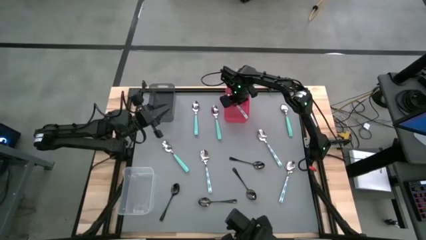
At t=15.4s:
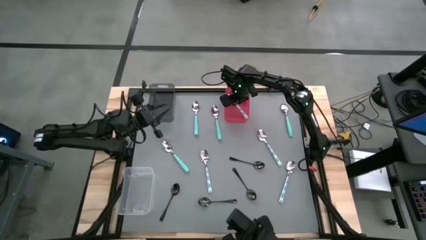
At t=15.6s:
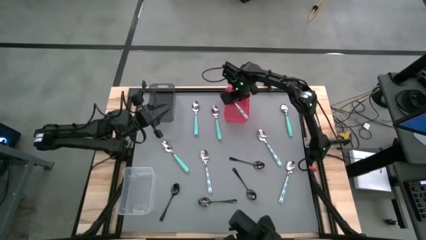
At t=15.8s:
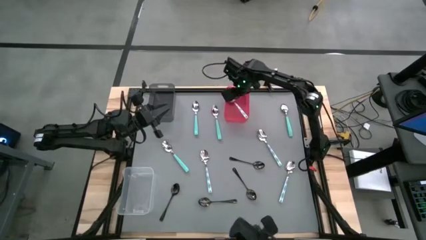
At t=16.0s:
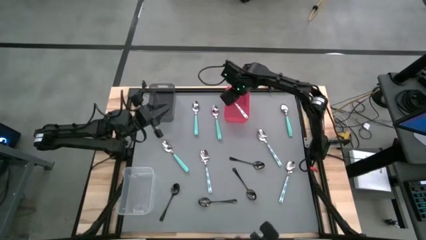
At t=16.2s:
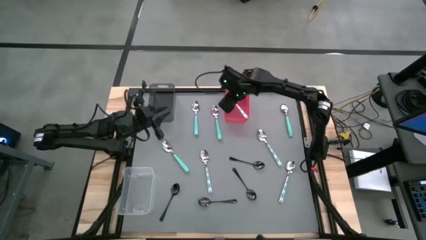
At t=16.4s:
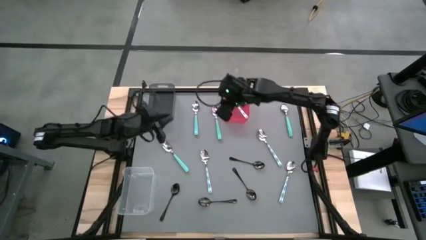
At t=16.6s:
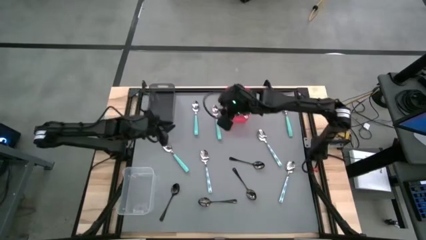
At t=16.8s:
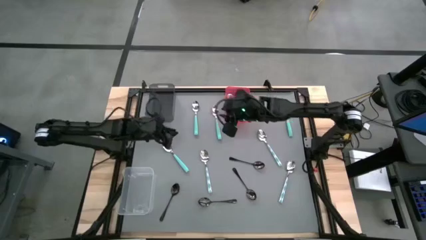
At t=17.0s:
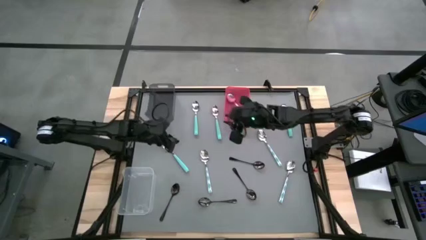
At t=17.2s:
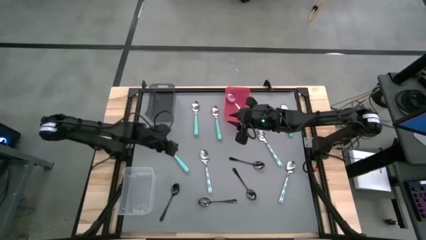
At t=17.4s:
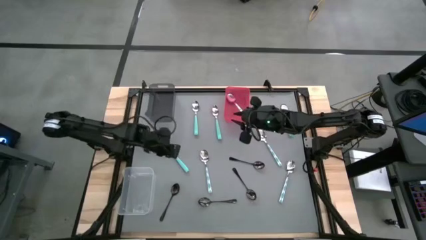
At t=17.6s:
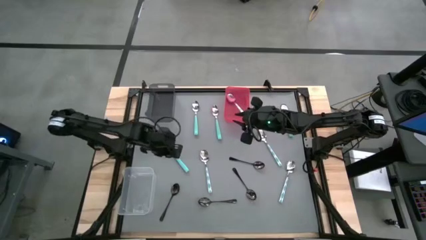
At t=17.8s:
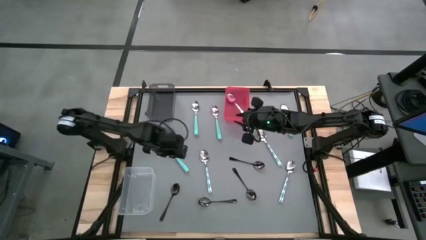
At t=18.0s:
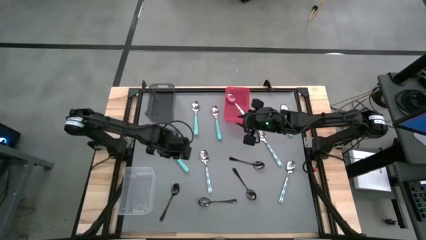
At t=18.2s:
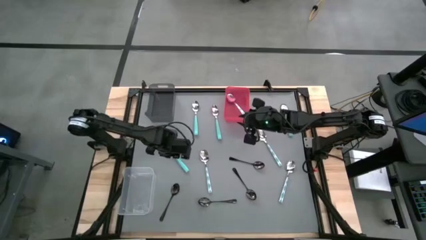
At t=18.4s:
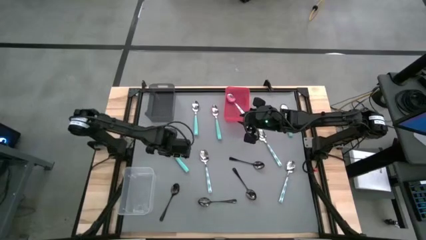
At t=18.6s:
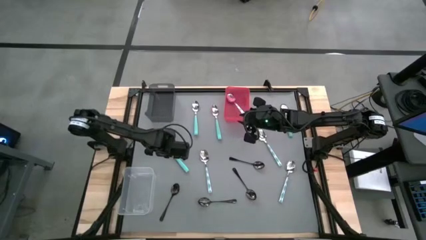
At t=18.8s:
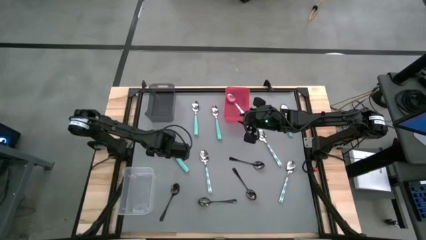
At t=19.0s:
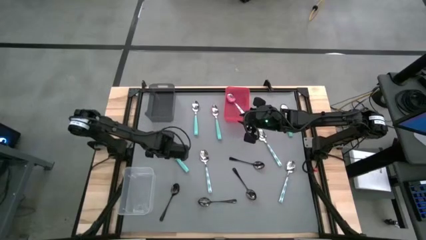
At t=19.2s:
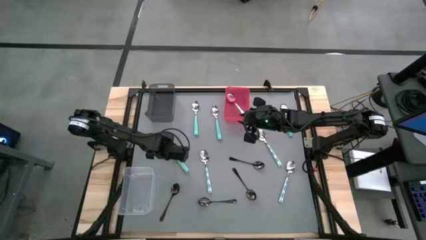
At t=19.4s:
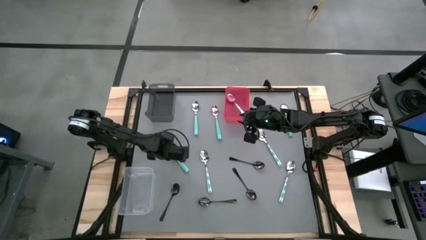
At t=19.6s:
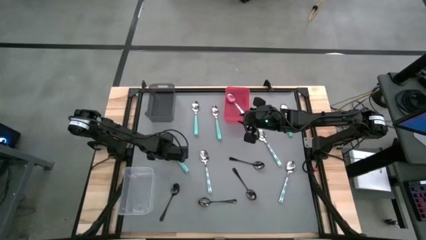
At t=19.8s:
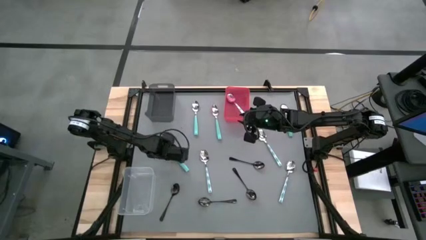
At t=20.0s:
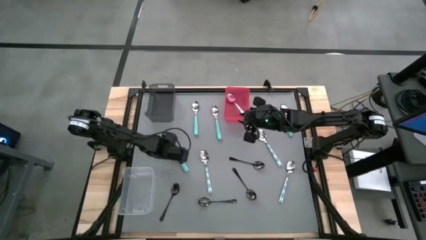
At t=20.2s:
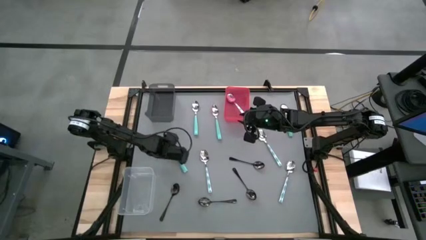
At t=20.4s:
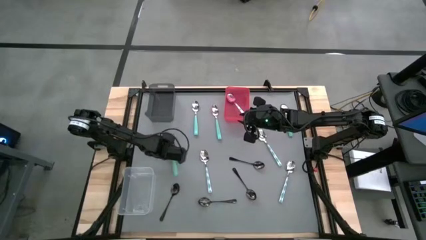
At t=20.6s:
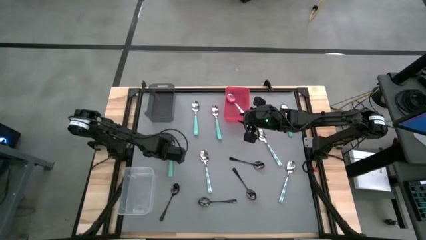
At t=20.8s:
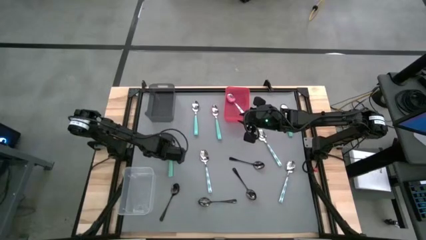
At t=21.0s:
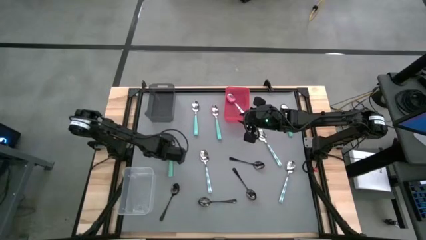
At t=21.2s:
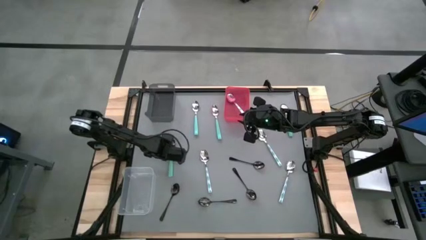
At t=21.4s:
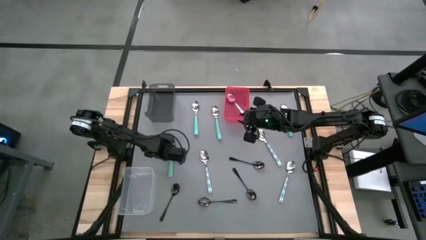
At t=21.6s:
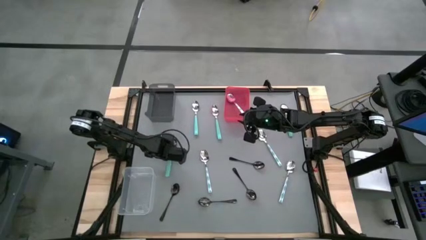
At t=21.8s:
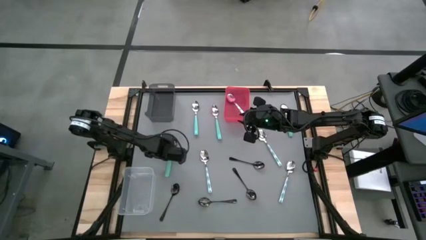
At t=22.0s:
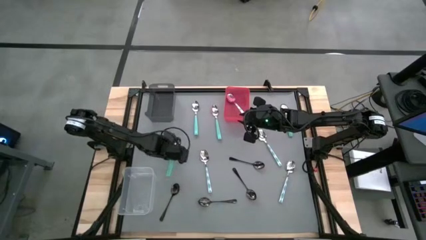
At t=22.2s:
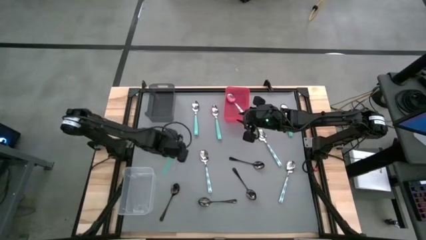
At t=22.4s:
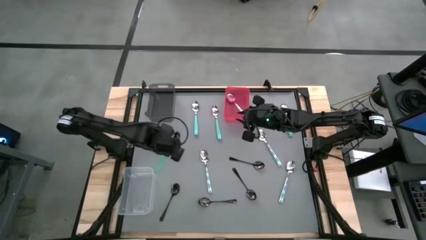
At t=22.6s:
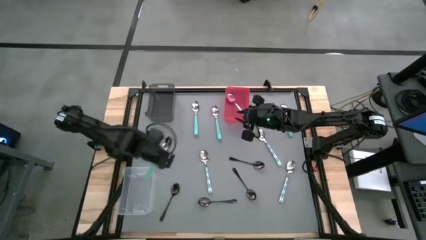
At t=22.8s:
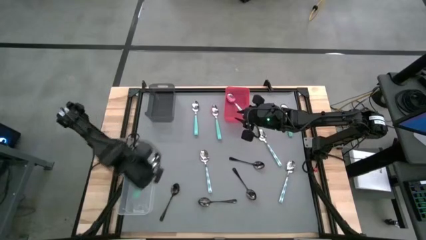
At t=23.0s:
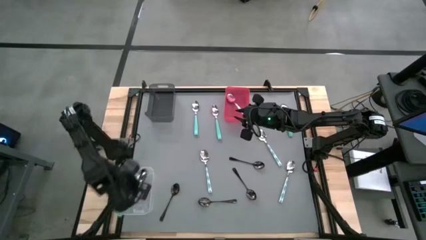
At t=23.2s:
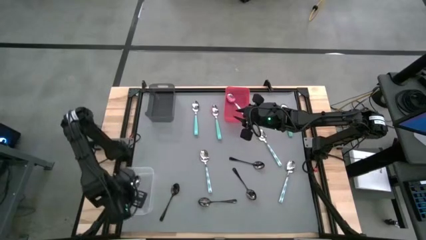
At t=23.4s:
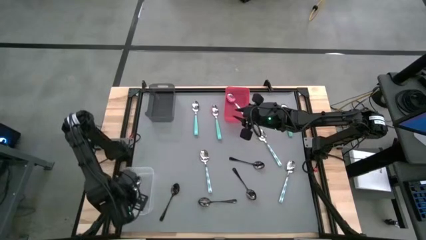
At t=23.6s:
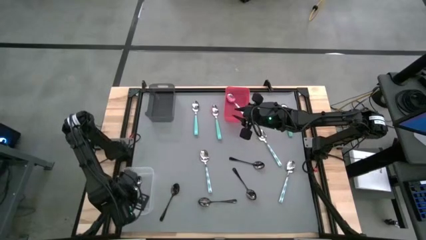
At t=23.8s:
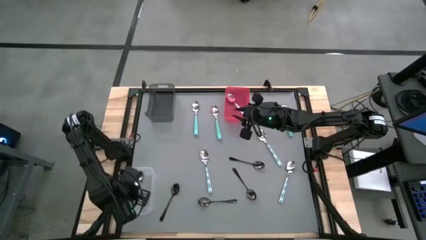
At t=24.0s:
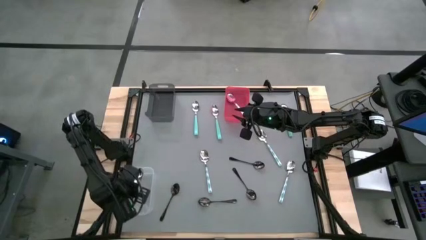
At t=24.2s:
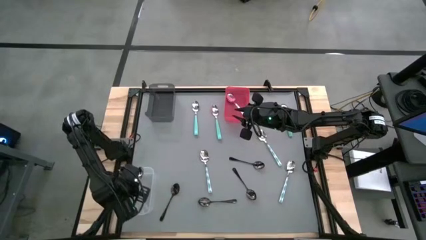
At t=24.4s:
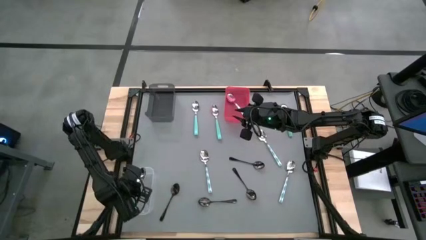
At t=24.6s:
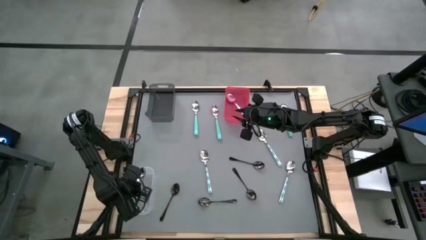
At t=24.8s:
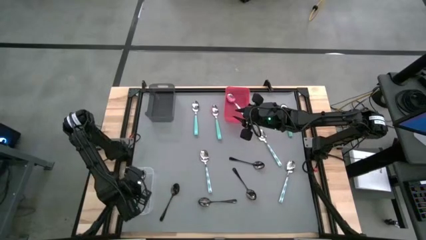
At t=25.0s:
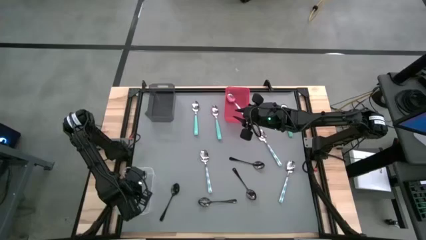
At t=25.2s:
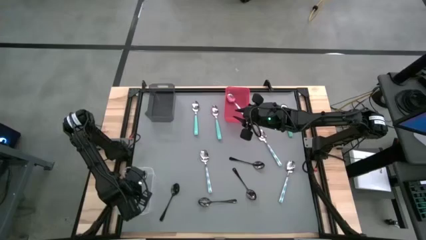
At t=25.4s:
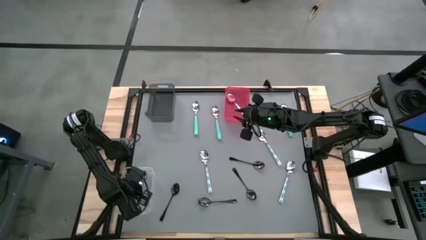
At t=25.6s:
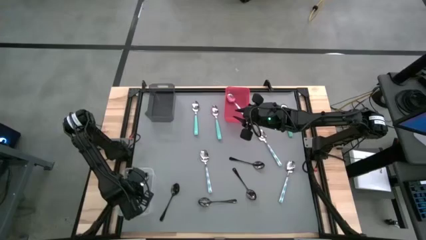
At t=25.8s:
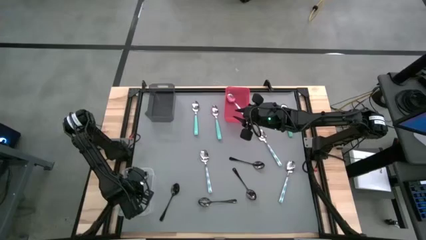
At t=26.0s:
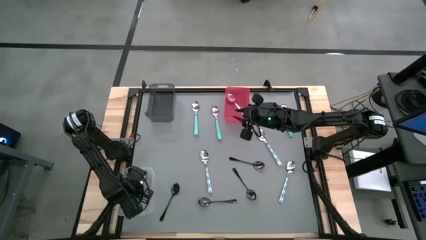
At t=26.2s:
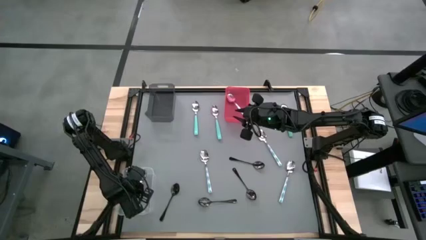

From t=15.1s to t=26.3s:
Task: Sort silverware by color (type)
Put the green spoon into the transparent bin
